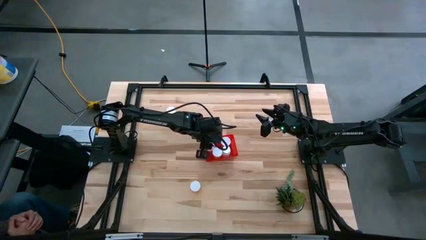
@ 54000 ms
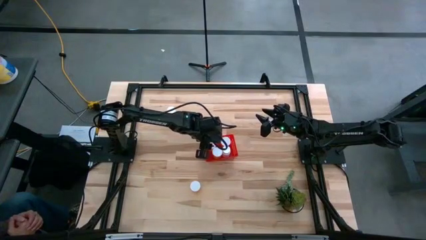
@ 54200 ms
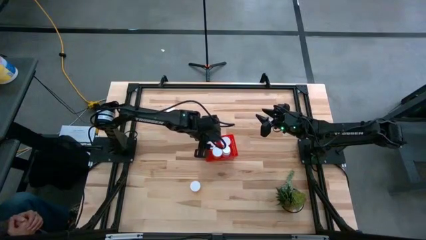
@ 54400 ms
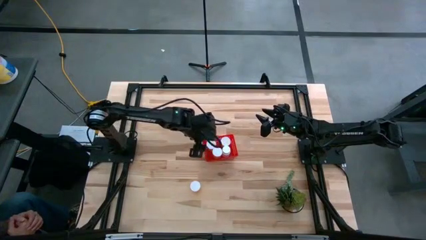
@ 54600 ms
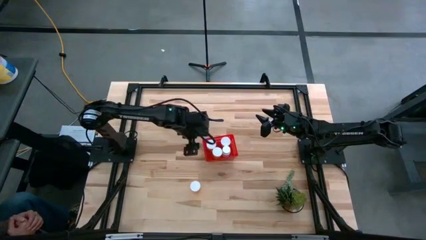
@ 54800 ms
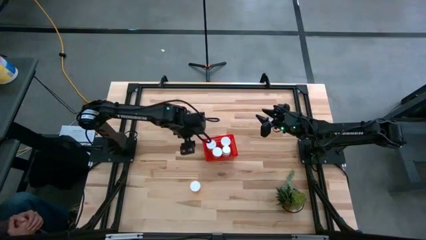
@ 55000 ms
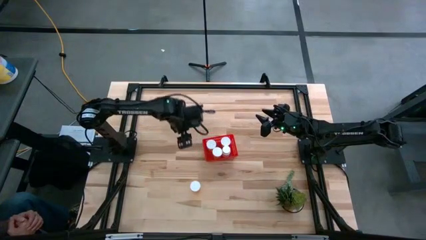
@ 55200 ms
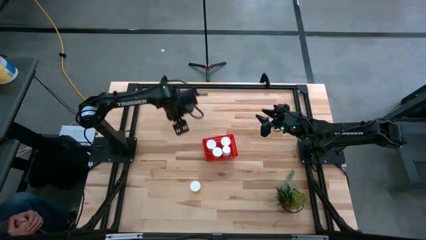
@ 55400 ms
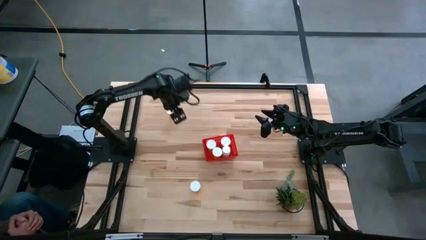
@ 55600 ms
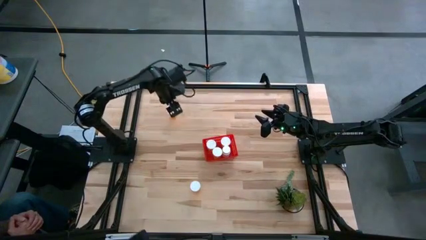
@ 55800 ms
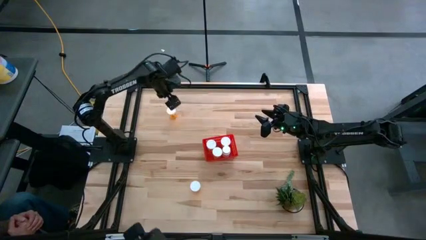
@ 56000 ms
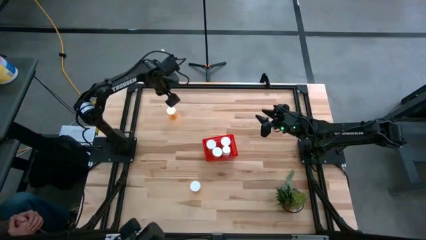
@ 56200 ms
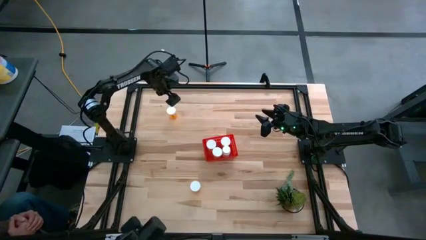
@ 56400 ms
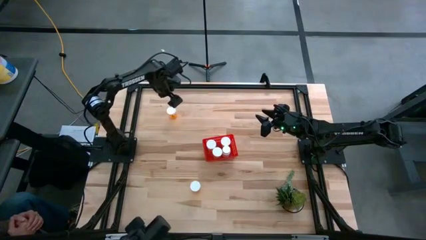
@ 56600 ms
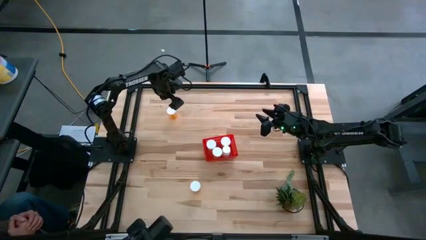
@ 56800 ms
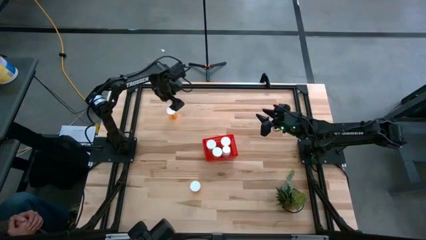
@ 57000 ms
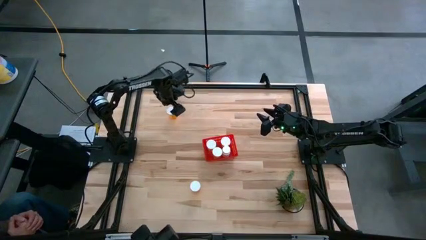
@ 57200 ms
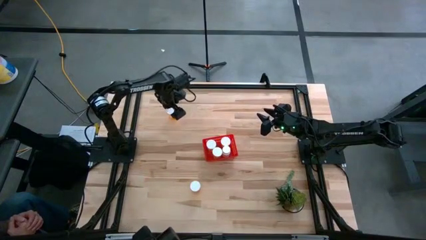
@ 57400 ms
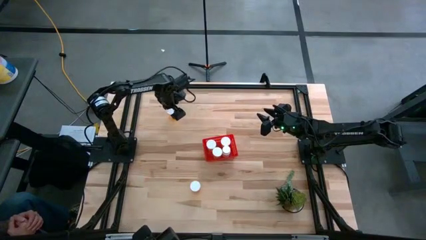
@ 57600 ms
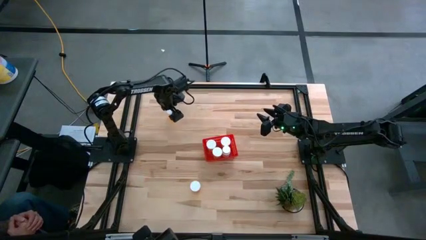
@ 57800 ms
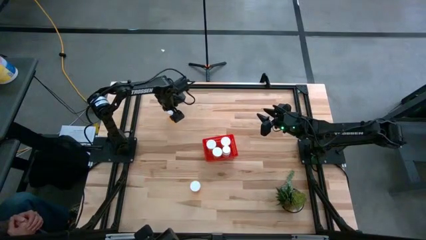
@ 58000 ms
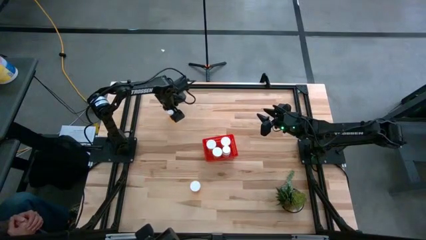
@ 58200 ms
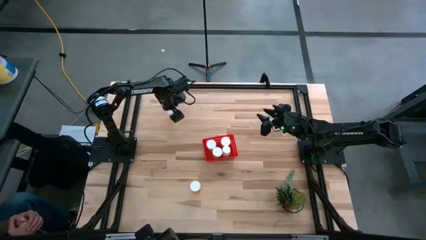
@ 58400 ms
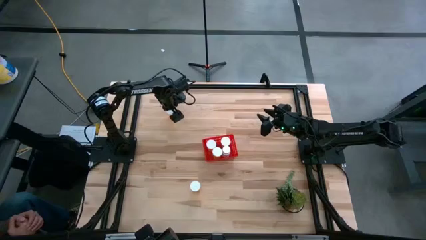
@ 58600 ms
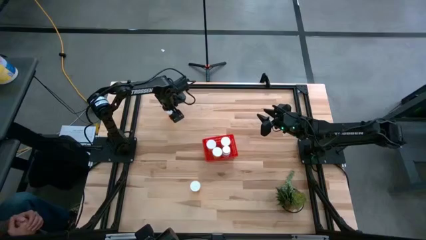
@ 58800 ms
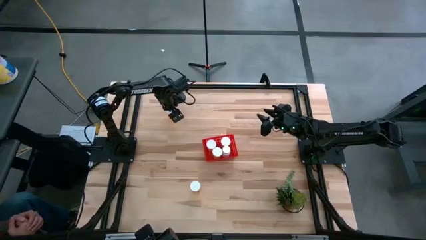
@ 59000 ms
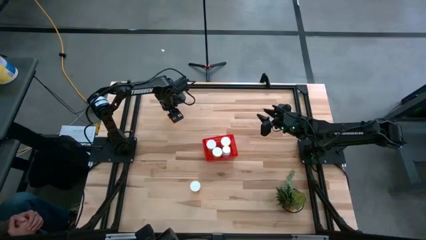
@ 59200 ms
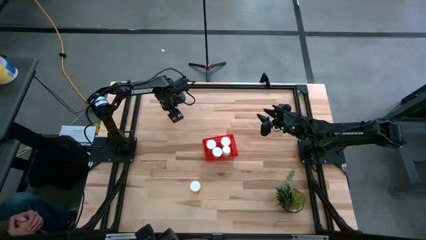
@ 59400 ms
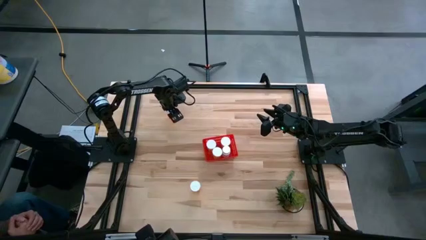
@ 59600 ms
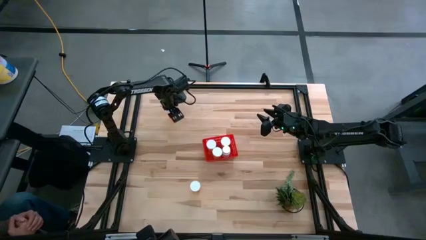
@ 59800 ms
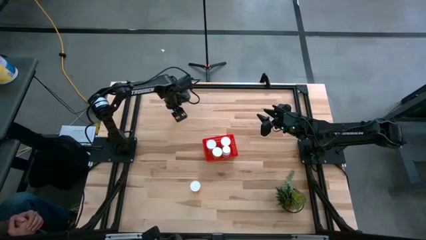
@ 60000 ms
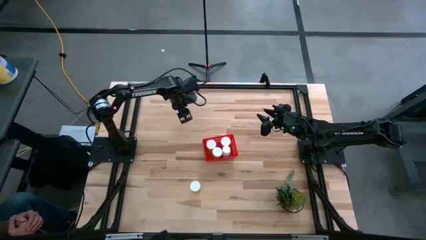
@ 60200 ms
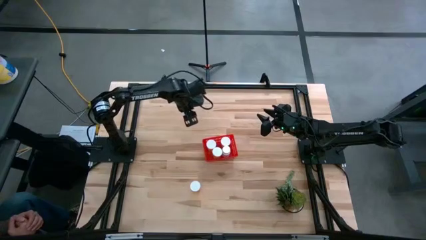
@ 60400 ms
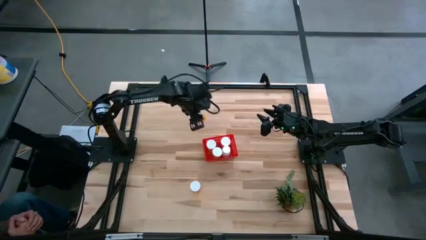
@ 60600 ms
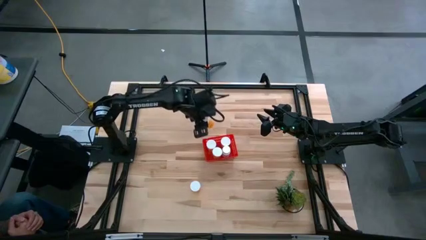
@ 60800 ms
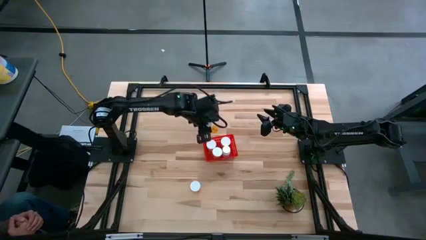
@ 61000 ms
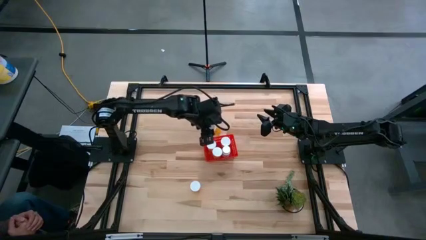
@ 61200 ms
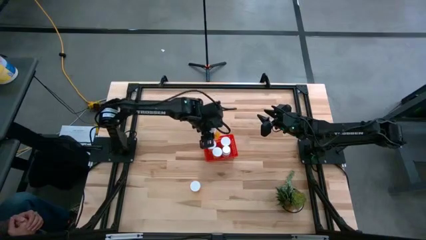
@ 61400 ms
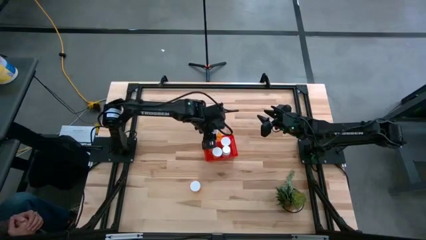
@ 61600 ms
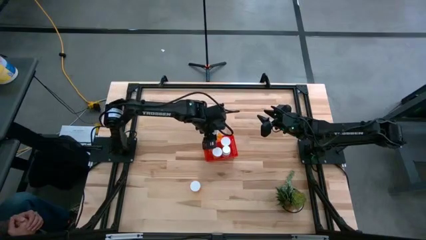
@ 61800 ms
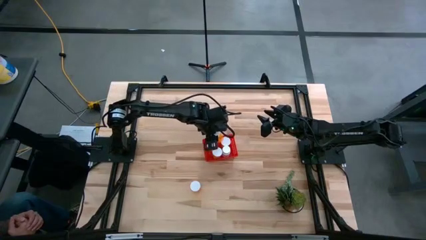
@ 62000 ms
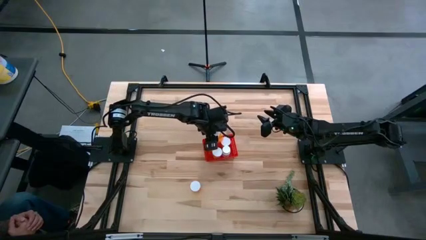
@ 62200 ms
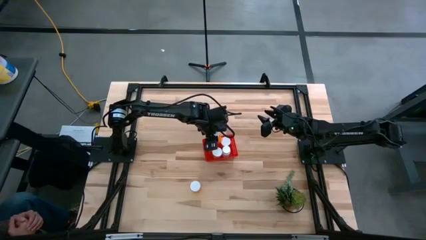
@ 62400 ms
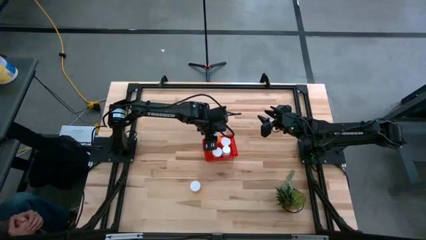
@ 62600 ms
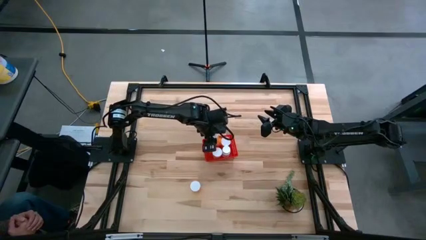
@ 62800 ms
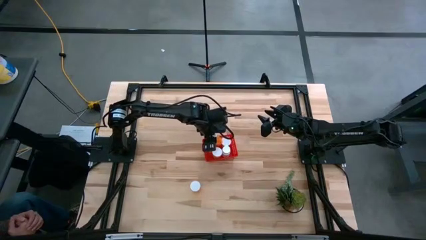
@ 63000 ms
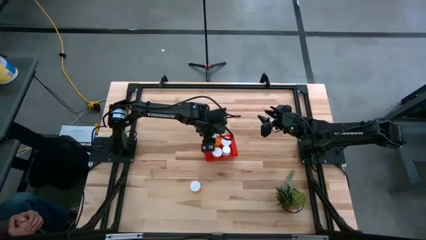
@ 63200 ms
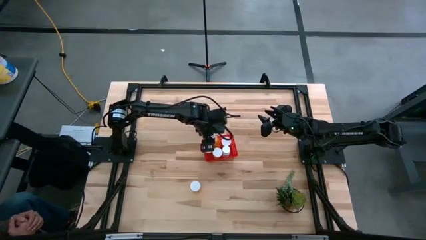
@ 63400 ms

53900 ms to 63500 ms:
Task: Pick and place pill bottles into a basket
Put the orange medicine bottle into the bin
